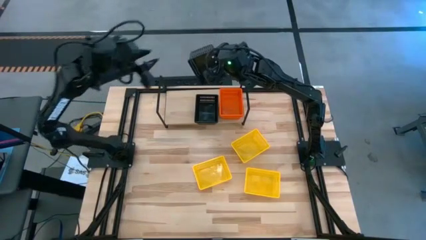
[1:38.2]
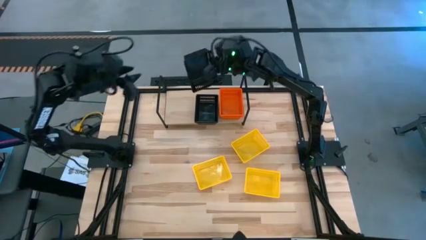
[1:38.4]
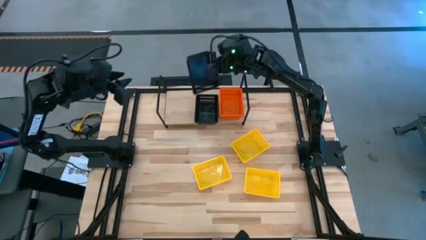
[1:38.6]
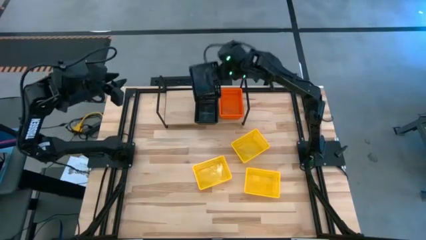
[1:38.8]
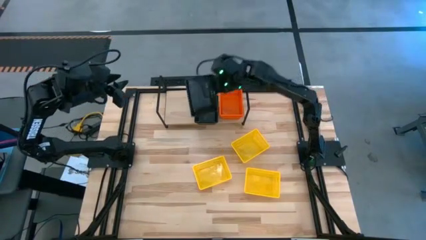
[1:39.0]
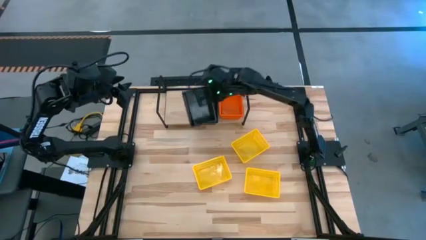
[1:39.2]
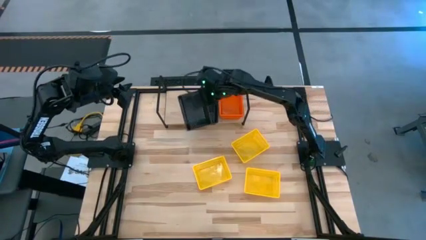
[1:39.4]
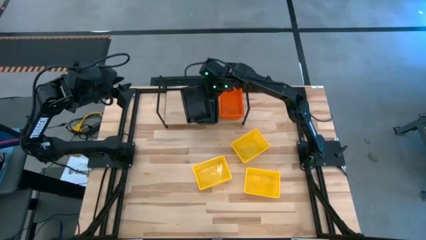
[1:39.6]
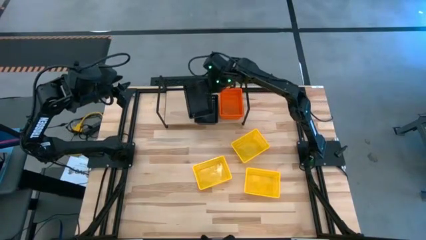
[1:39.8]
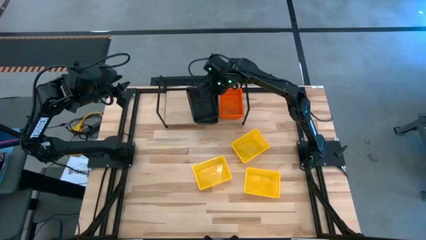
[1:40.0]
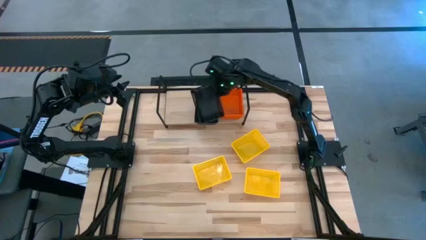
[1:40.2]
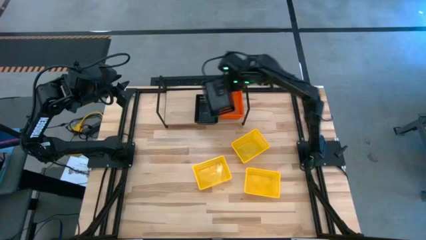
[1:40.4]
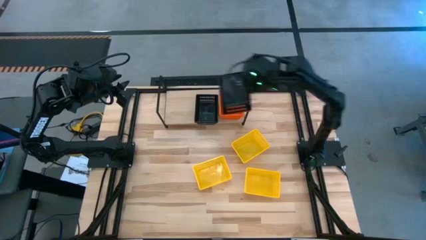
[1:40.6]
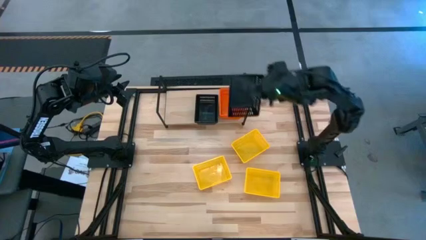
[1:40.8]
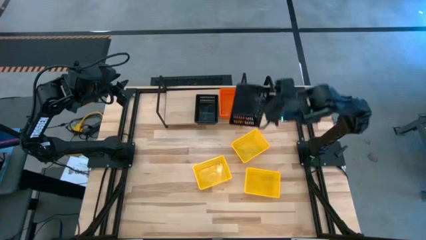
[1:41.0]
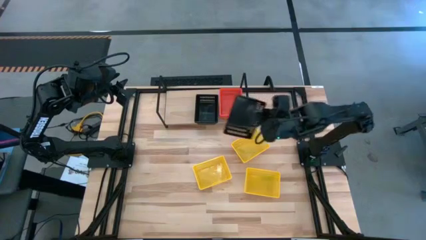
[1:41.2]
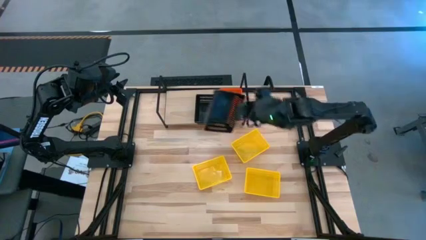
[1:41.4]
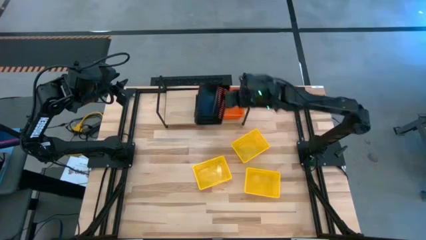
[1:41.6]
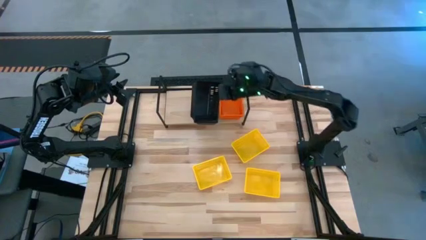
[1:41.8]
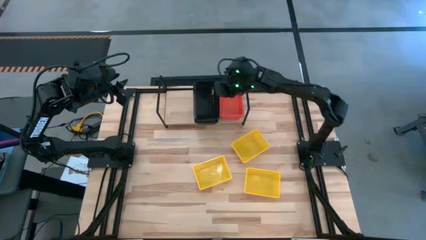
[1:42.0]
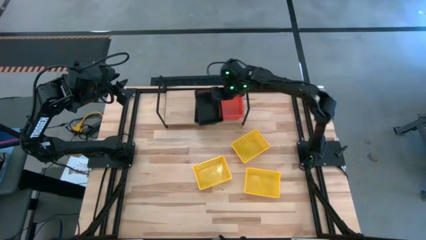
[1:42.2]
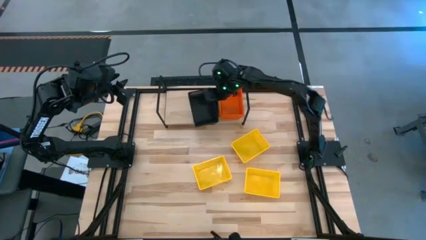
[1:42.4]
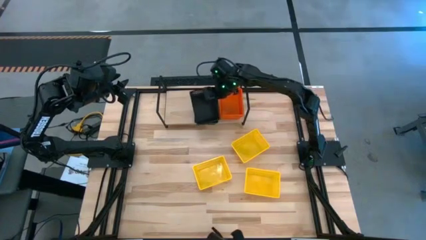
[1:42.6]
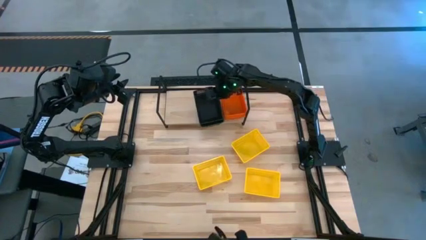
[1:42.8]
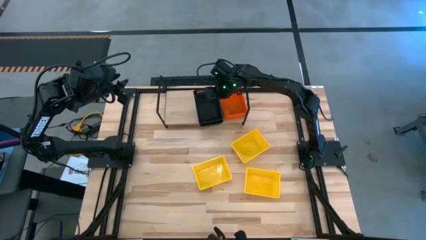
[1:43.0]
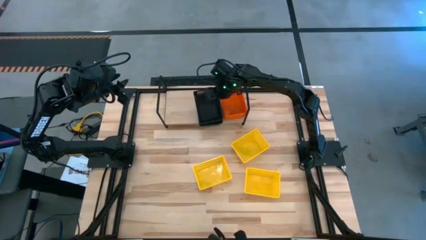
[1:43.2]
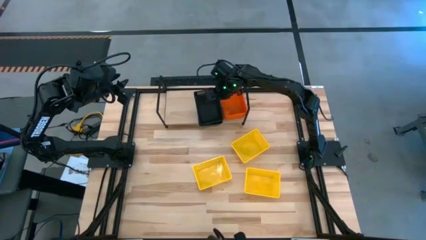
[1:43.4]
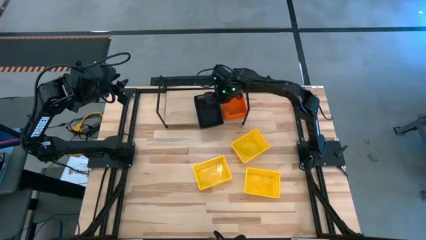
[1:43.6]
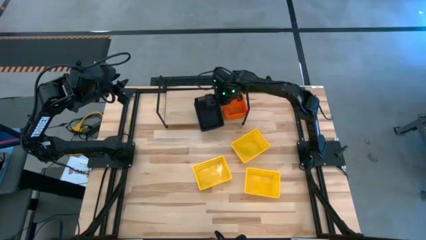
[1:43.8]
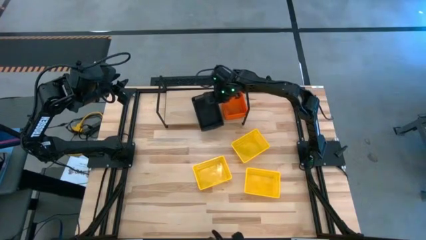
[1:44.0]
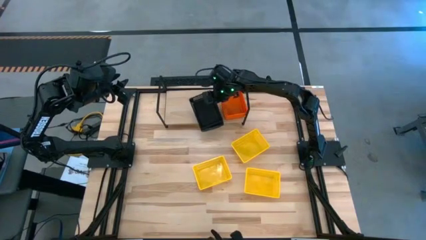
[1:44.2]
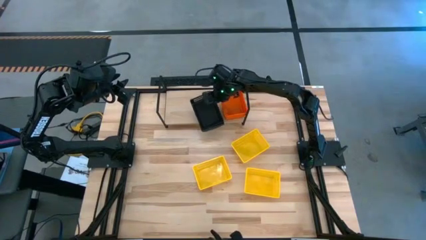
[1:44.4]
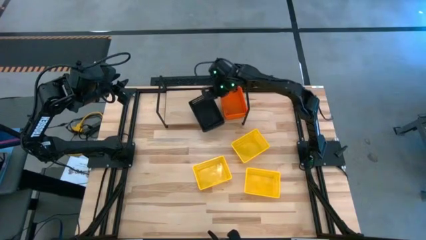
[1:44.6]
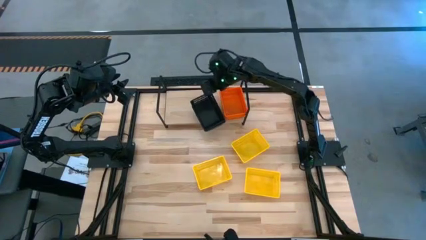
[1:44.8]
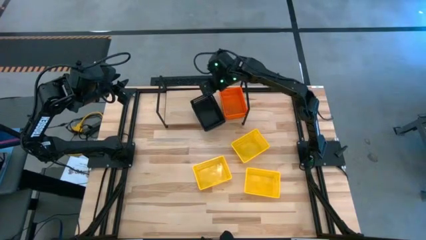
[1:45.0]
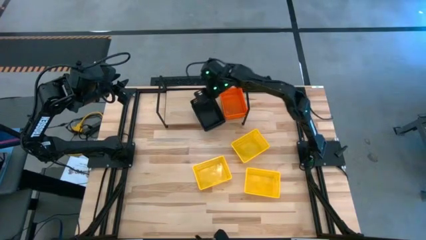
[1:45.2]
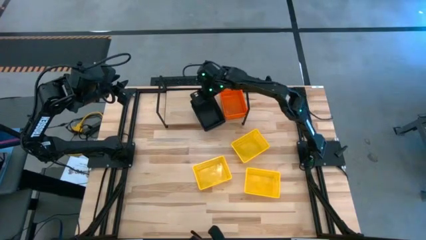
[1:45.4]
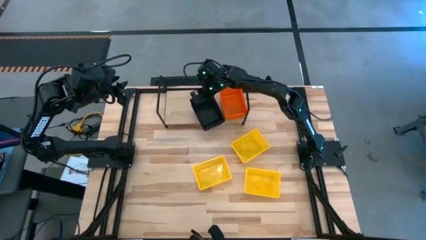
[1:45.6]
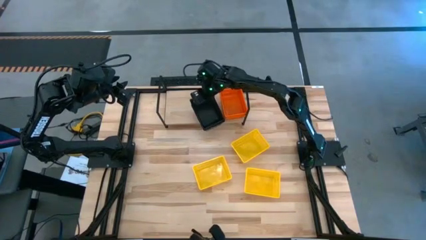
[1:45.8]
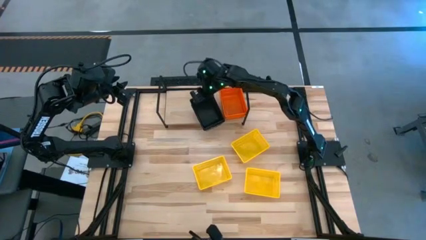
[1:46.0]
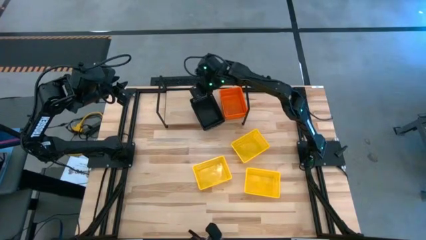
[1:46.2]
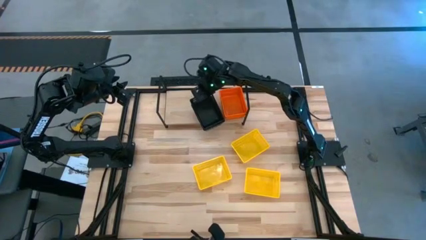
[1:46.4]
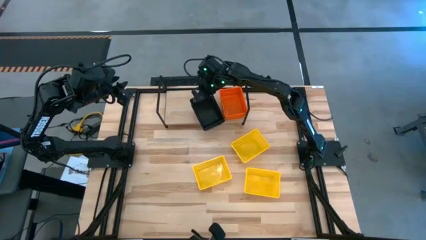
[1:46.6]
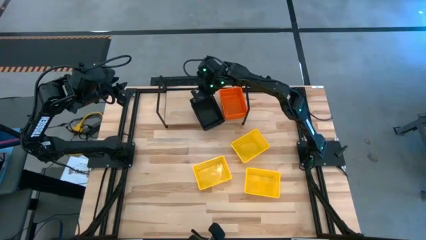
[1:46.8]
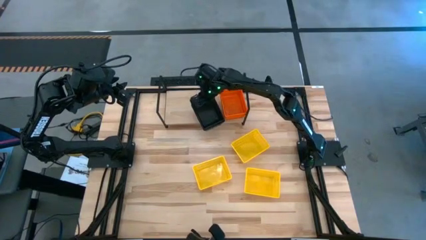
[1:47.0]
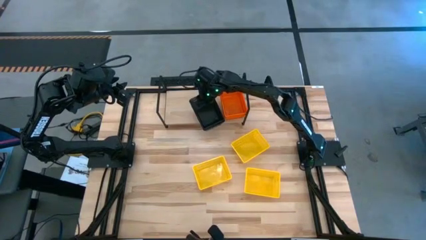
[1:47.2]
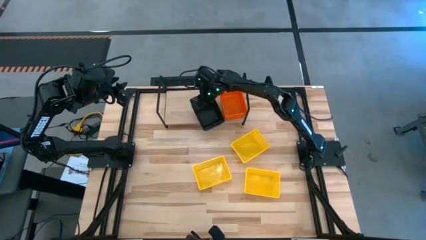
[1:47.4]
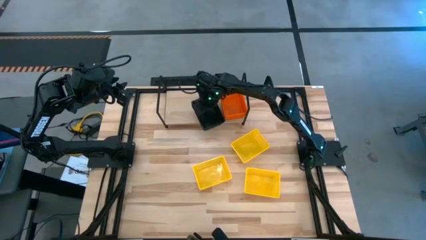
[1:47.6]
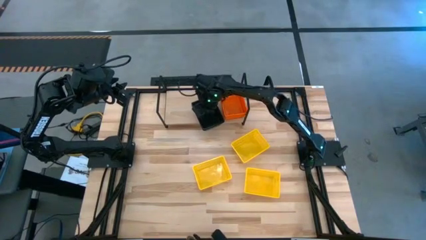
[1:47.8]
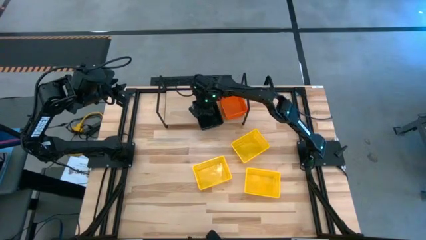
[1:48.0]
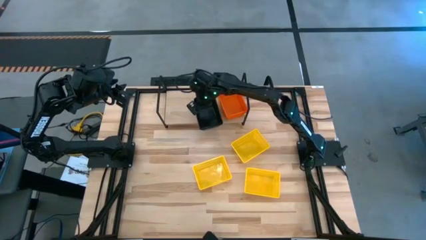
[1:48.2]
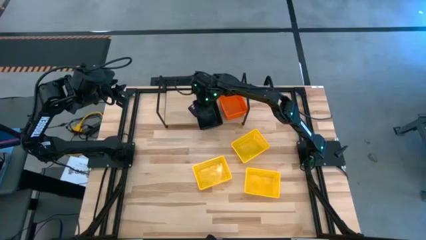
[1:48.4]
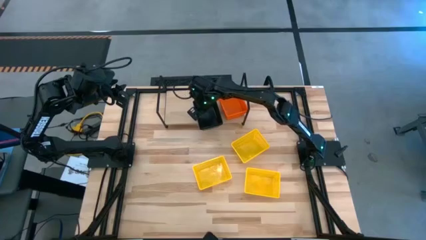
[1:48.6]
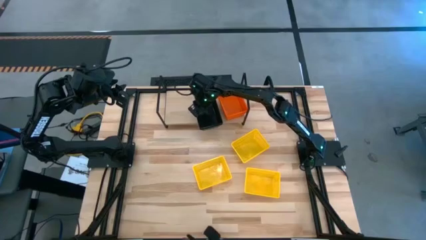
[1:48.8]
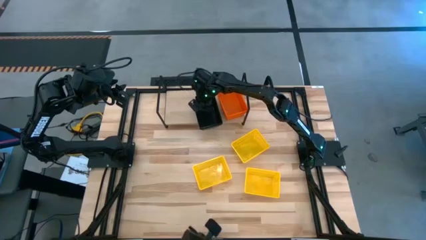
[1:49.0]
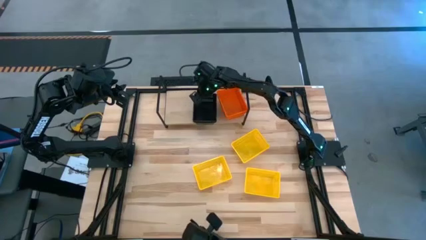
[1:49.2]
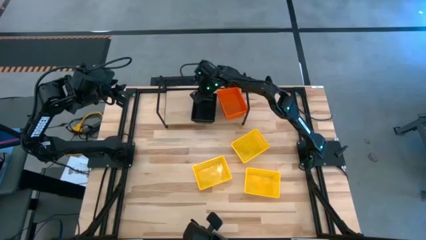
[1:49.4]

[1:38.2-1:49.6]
Task: Stack baskets on shelf by color
Stack the black bin on top of the black bins on the shelf

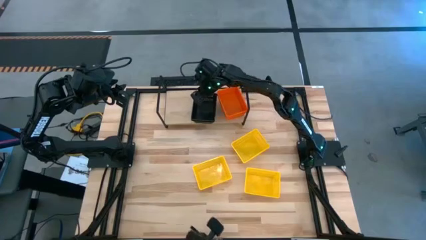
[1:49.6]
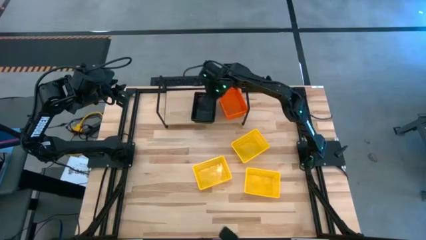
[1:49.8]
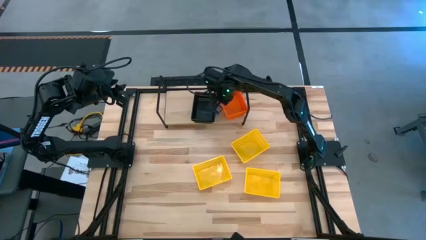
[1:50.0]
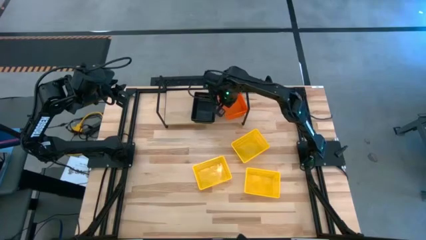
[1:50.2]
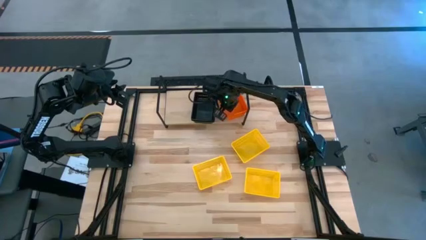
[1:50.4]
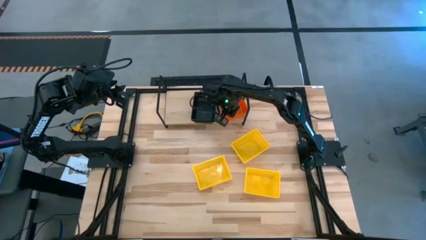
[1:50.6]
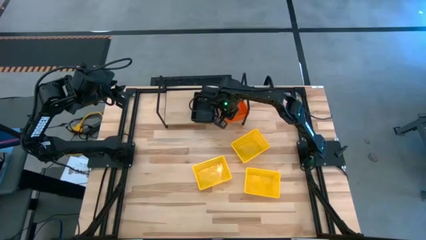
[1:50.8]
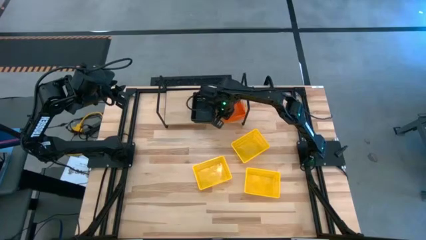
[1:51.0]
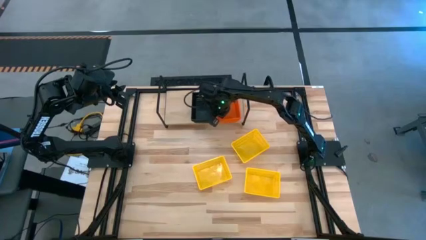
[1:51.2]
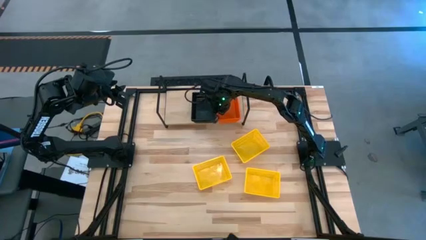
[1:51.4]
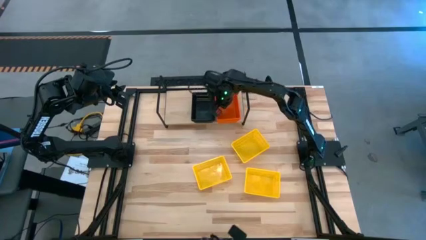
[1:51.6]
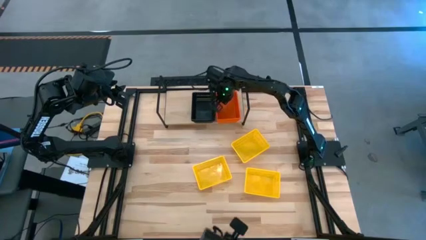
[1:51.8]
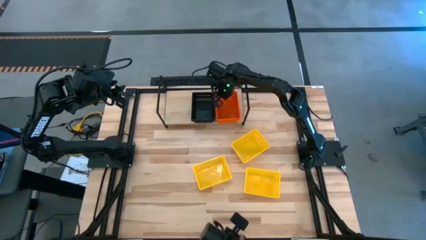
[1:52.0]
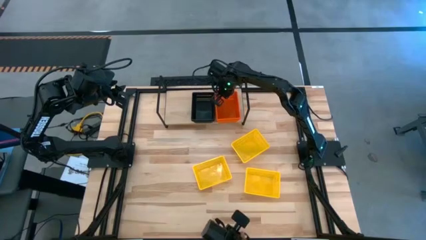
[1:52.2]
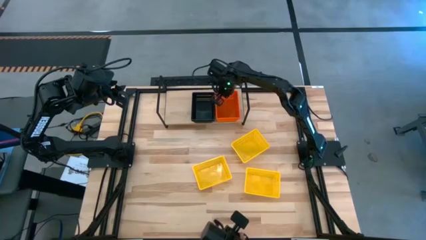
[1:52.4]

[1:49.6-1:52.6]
Adjust the orange bin
